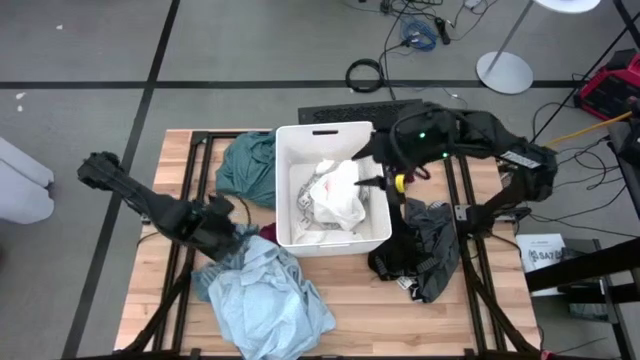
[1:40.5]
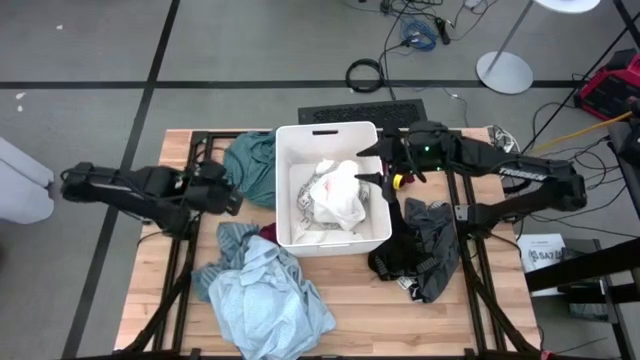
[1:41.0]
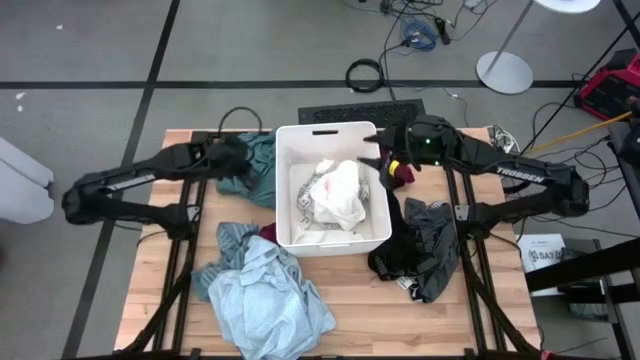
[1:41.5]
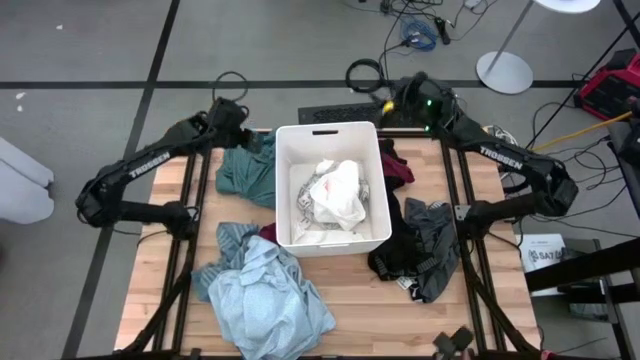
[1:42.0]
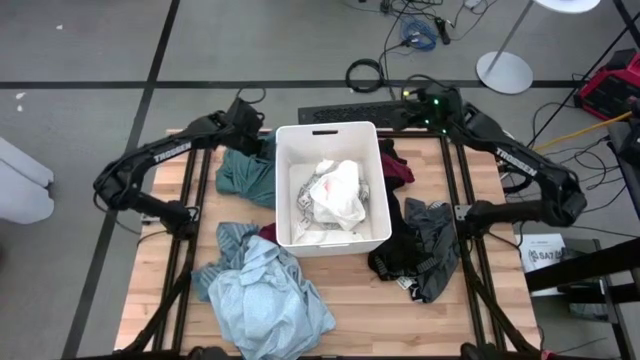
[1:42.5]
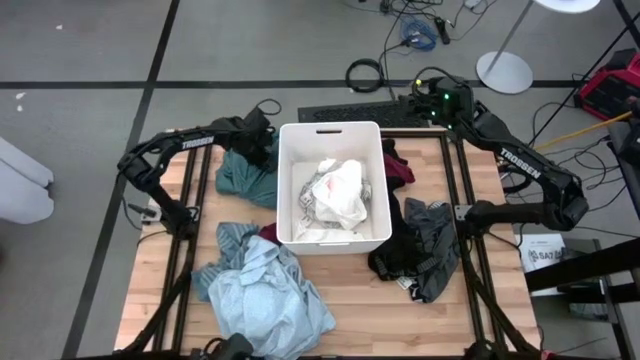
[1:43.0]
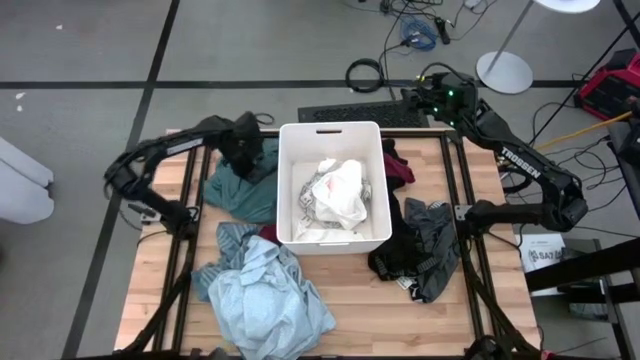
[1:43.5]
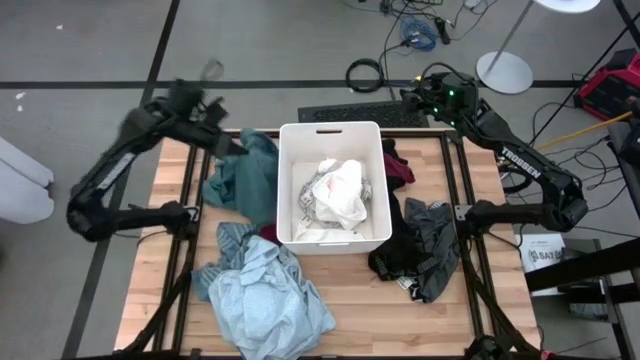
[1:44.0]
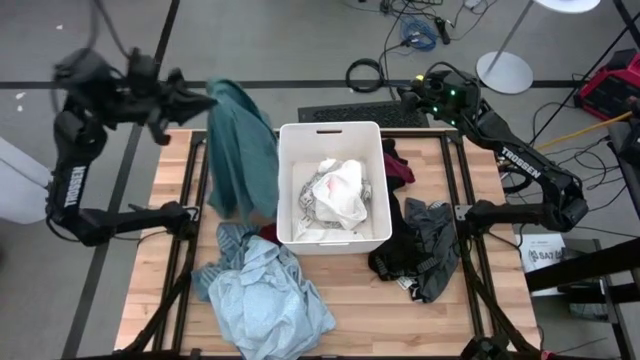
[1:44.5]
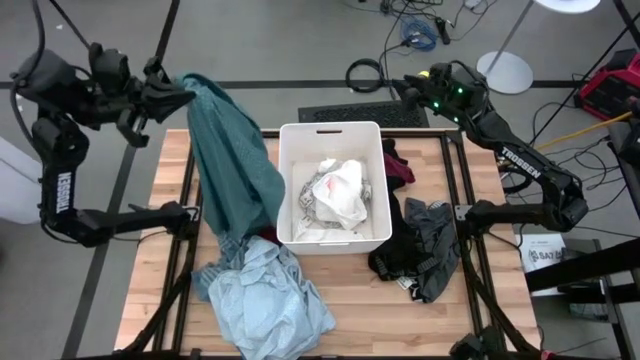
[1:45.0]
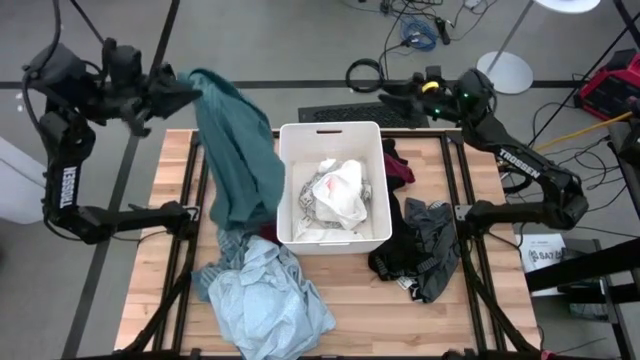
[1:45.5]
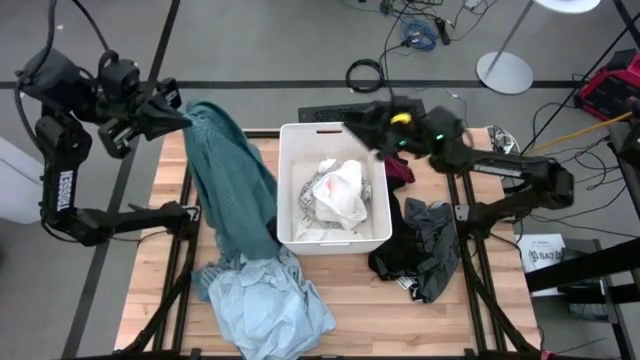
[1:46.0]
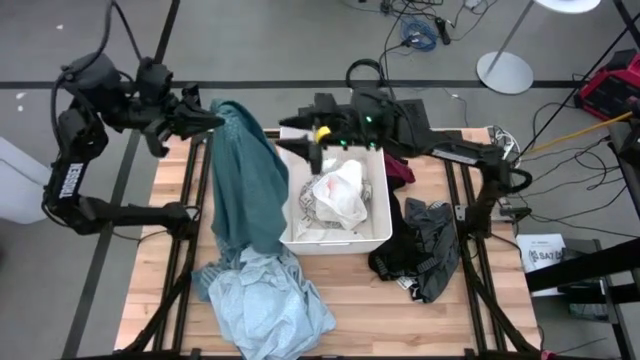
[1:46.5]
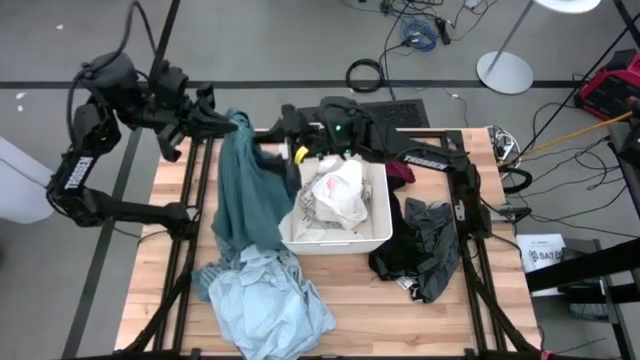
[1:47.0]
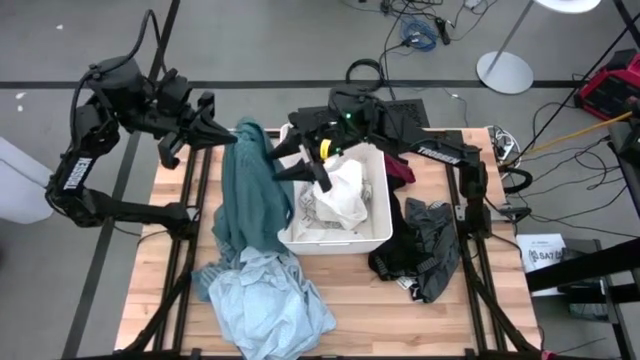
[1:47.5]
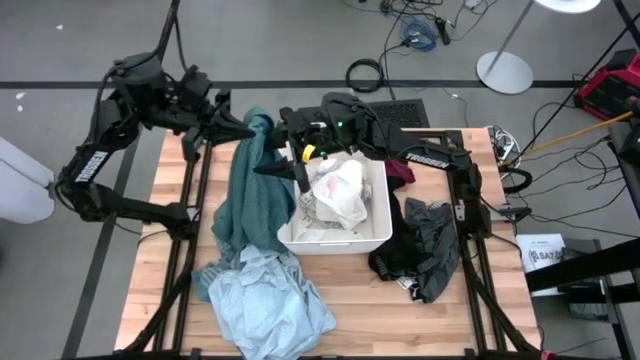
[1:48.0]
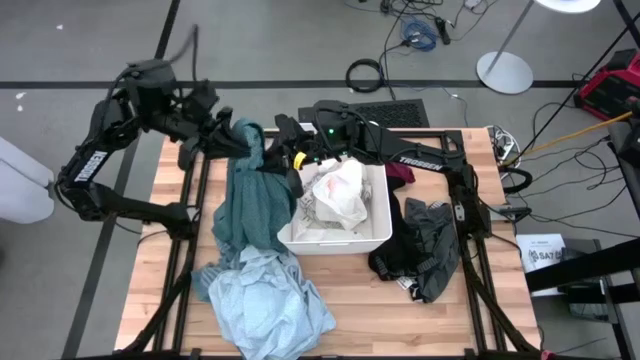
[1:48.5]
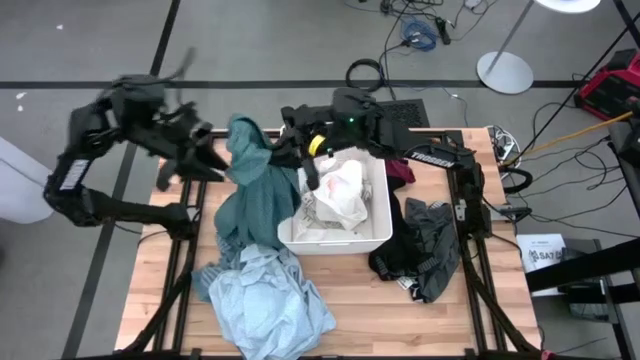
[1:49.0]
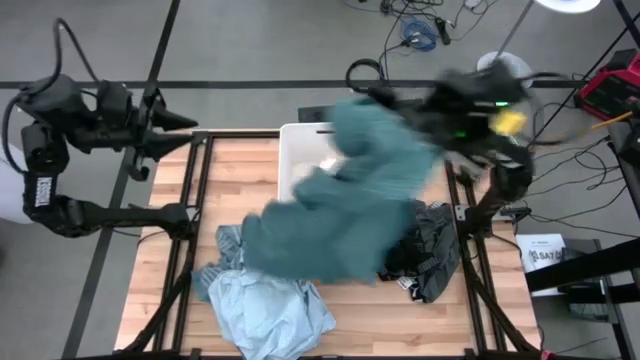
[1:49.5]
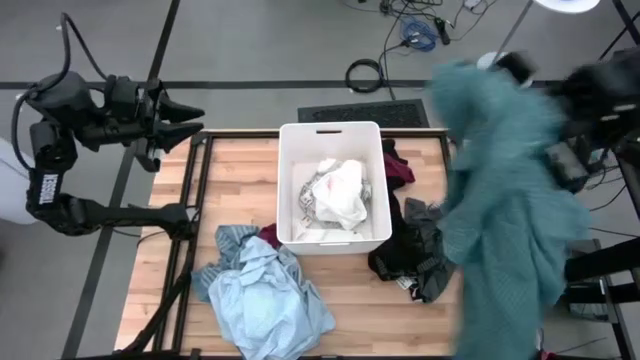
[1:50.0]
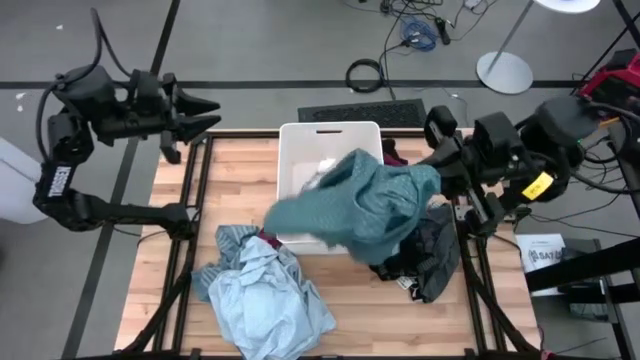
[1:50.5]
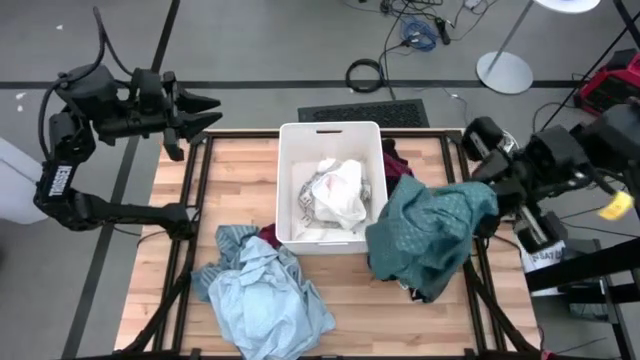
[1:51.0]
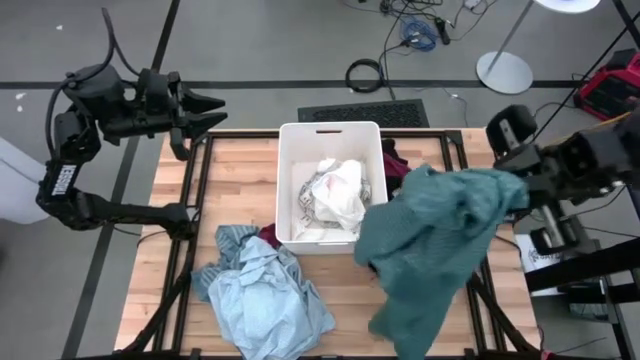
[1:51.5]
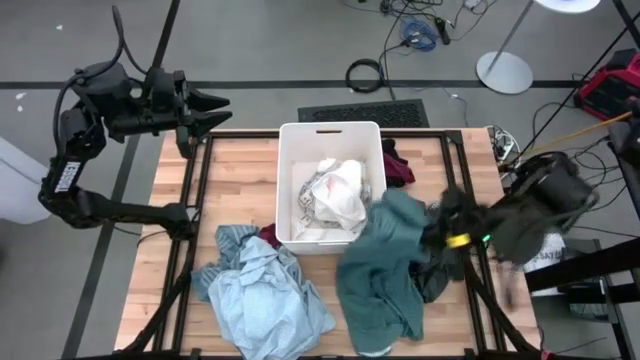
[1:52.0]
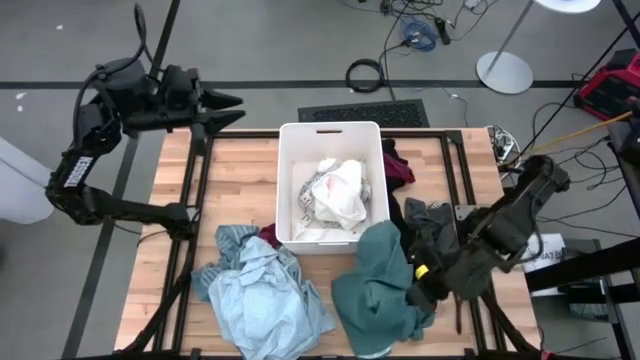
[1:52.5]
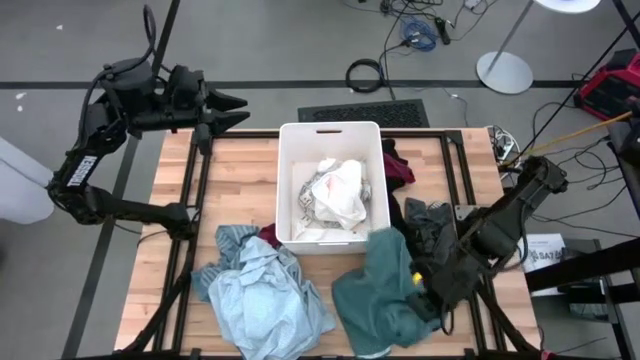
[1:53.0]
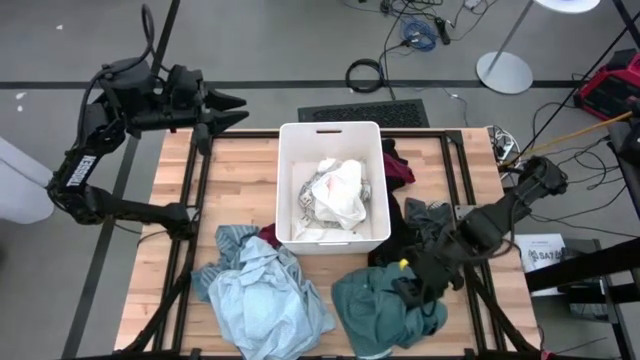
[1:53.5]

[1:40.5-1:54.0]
Task: Sort clothes
Move the green shirt to the bottom middle of the table

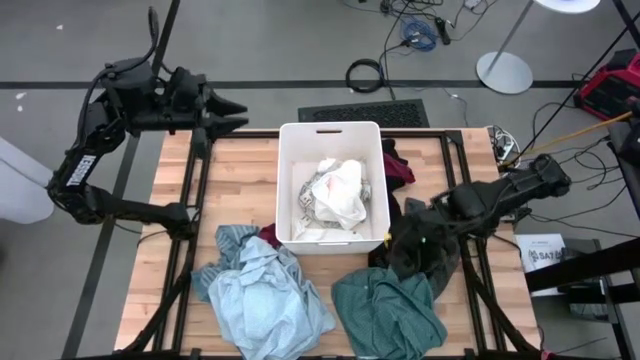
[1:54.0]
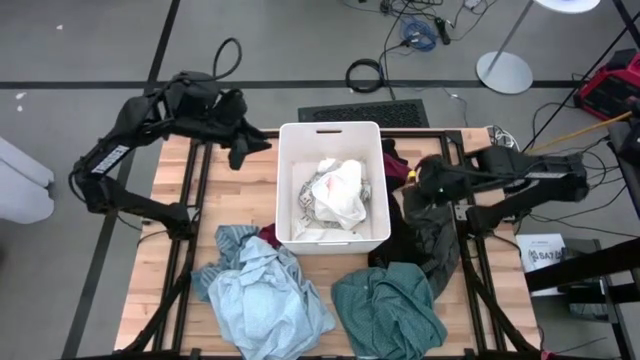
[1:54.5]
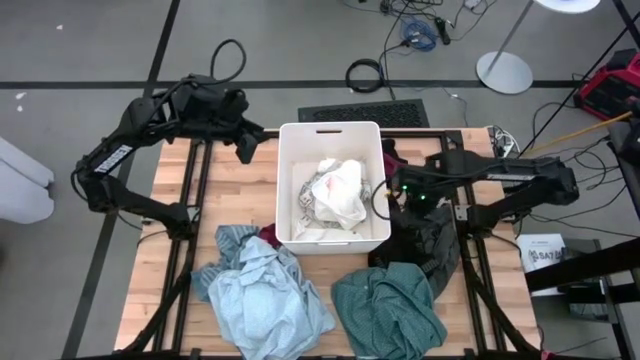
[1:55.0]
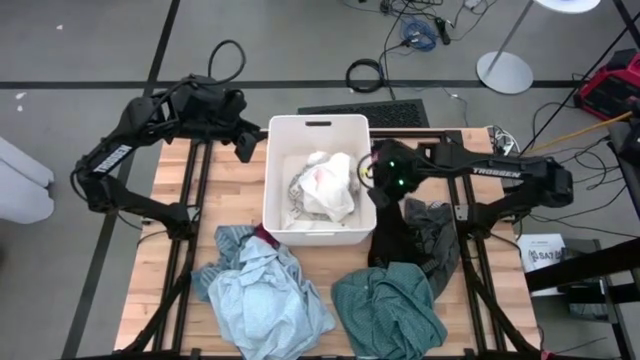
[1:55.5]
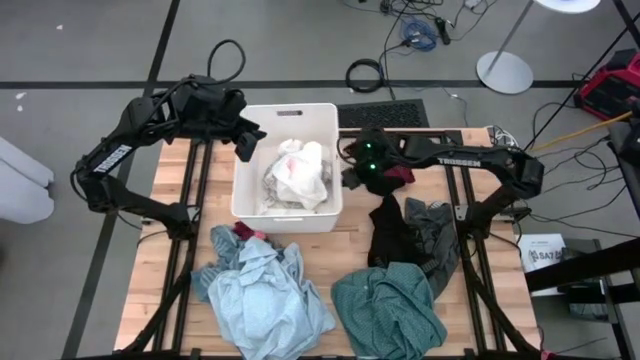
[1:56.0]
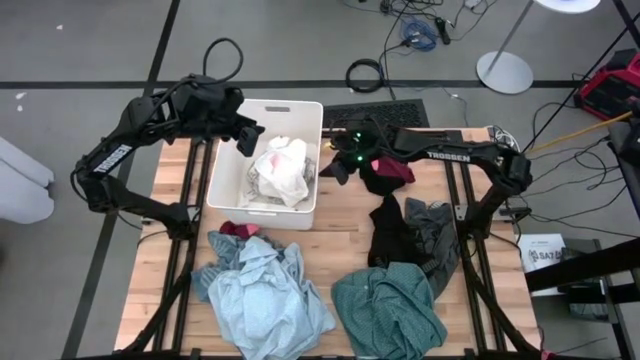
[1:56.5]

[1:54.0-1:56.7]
Move the white laundry organizer on the top left of the table

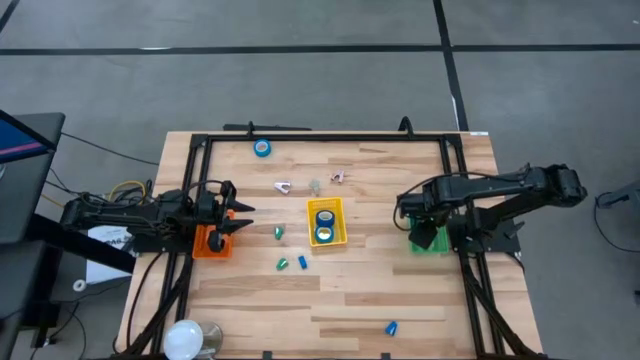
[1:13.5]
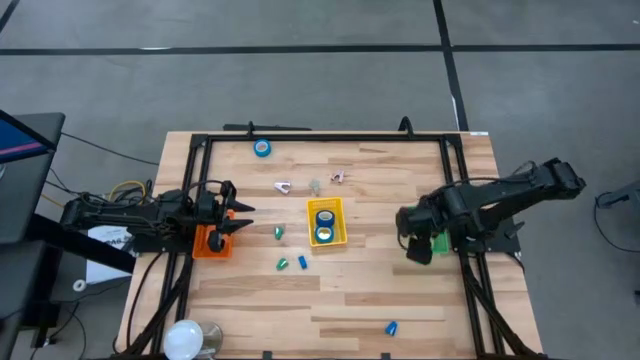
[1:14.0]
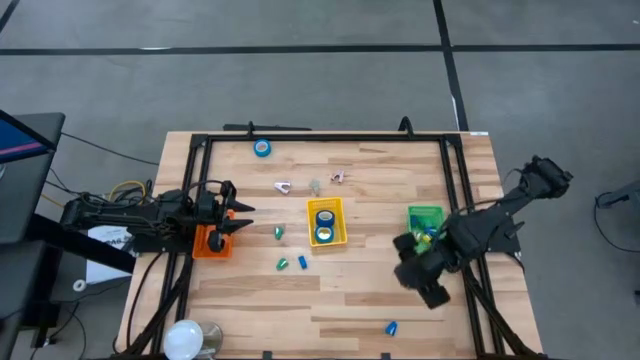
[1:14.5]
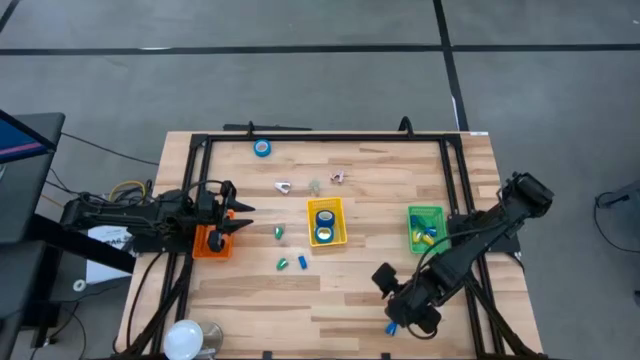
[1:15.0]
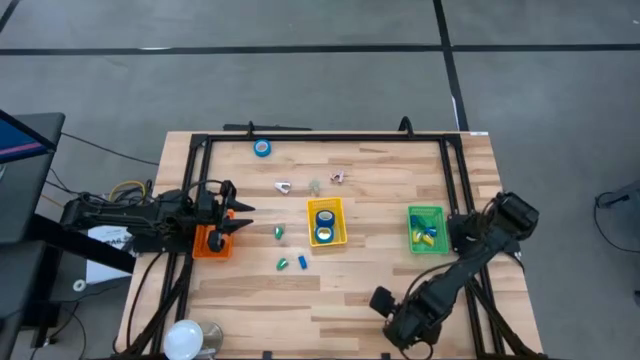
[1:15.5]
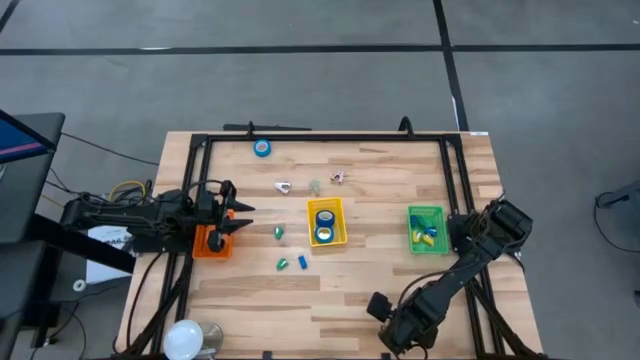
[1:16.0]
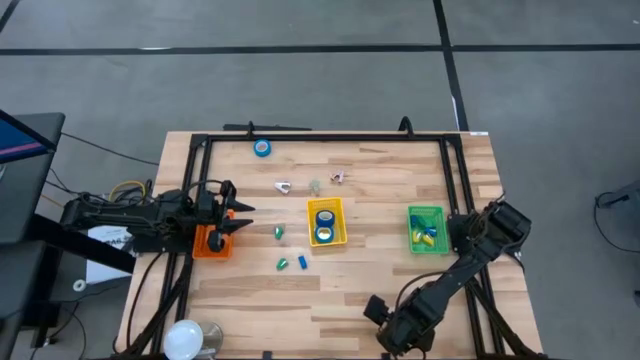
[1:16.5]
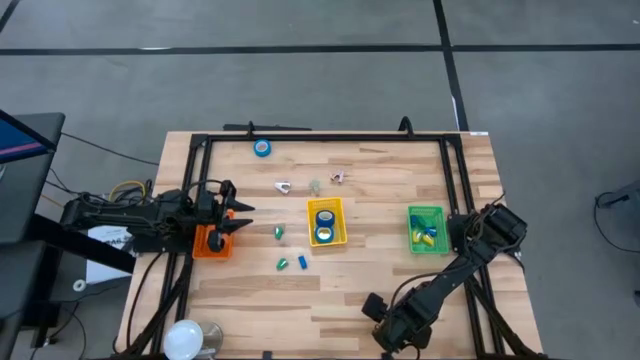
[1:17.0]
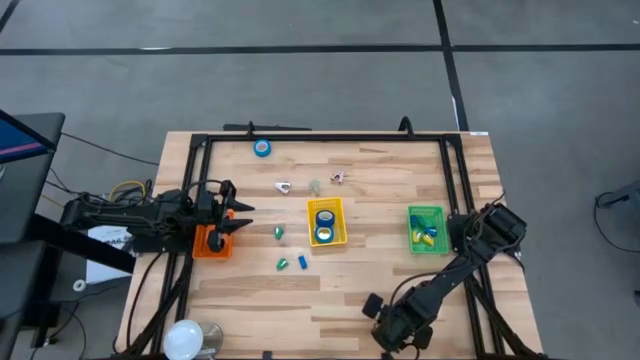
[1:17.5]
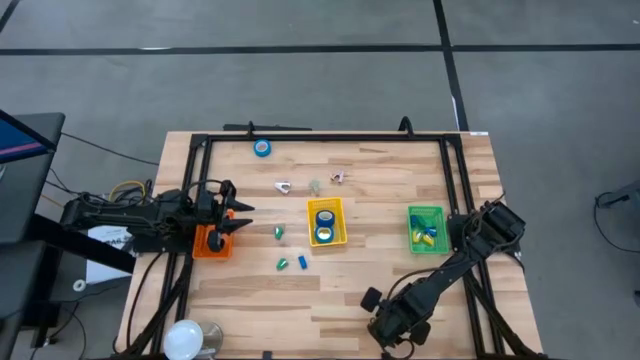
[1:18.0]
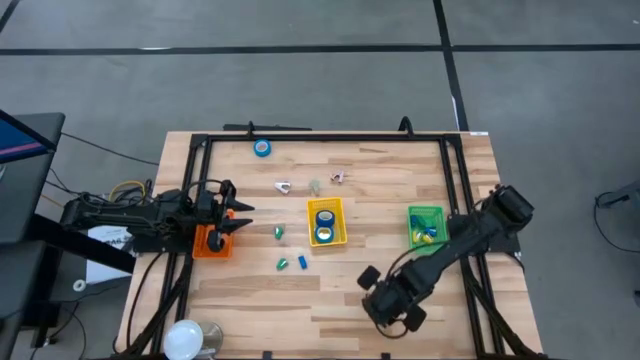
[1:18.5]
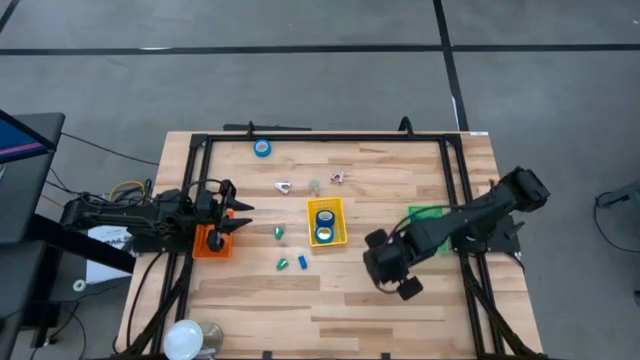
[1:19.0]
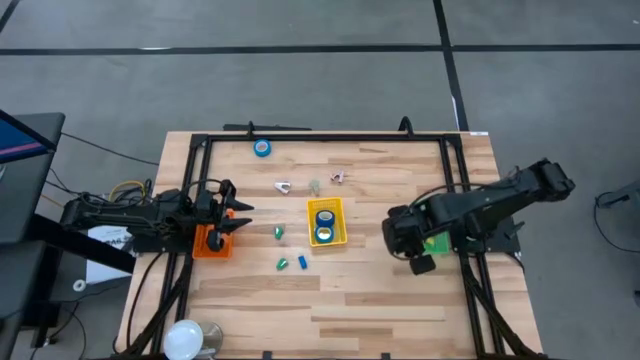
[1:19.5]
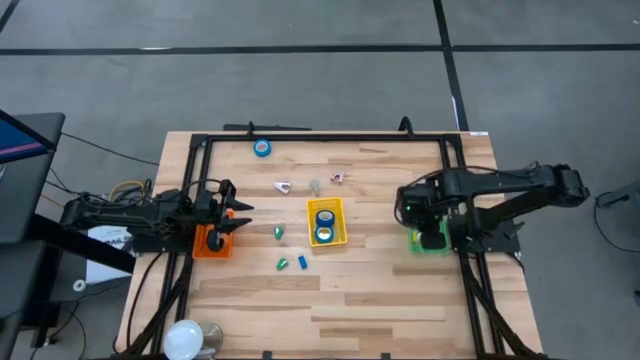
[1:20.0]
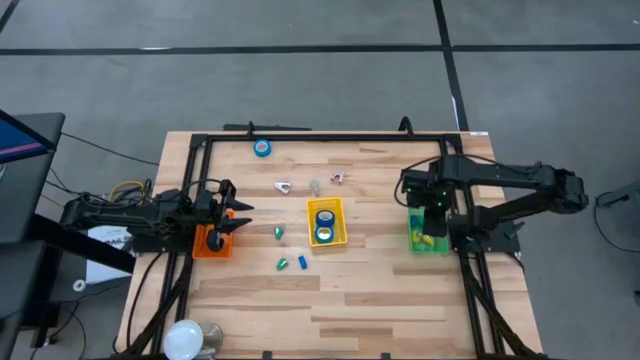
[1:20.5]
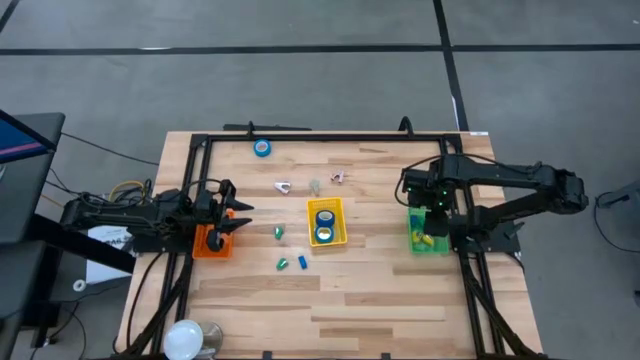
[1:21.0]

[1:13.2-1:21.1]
Task: Pick and place Stapler, Stapler remover, tape
Put the blue stapler into the green basket
